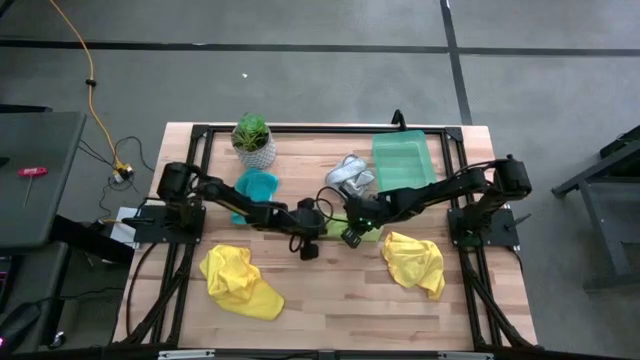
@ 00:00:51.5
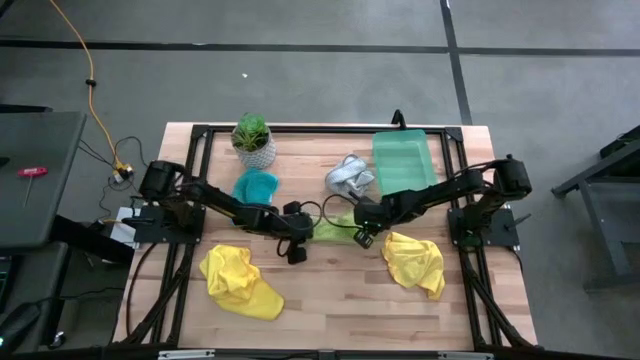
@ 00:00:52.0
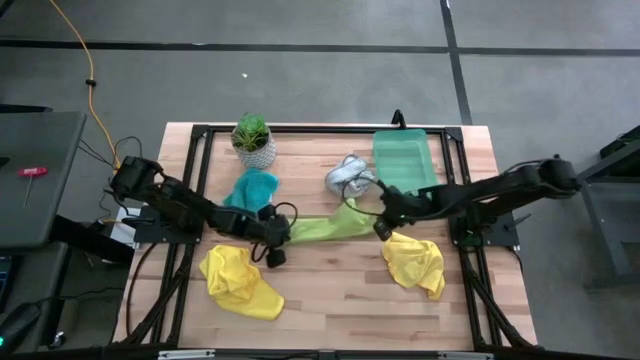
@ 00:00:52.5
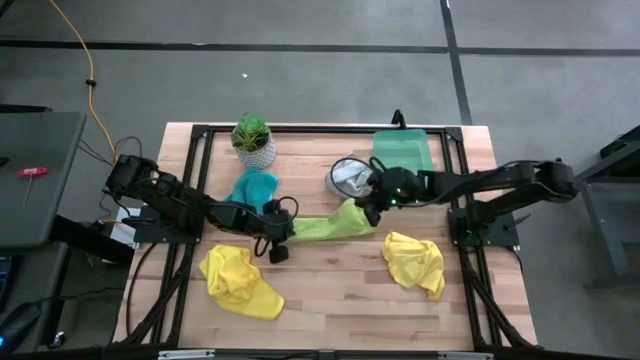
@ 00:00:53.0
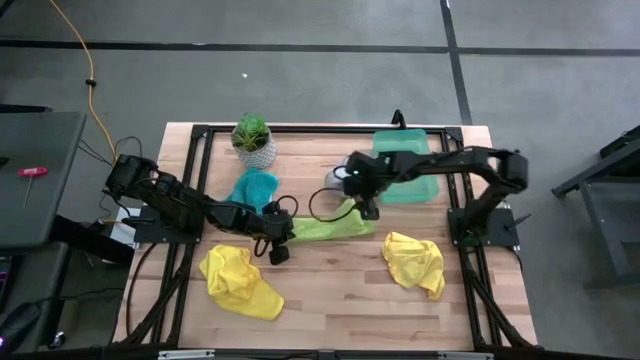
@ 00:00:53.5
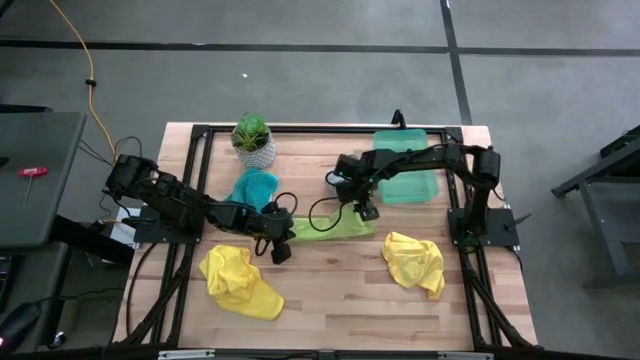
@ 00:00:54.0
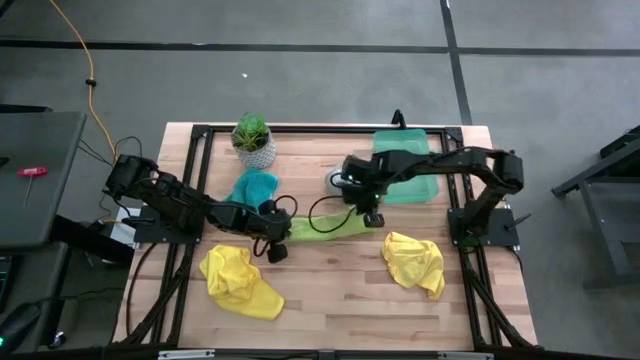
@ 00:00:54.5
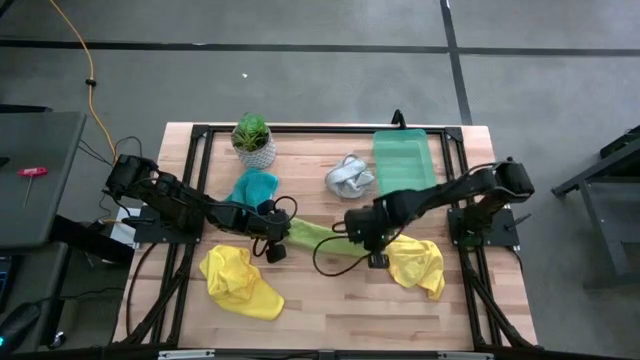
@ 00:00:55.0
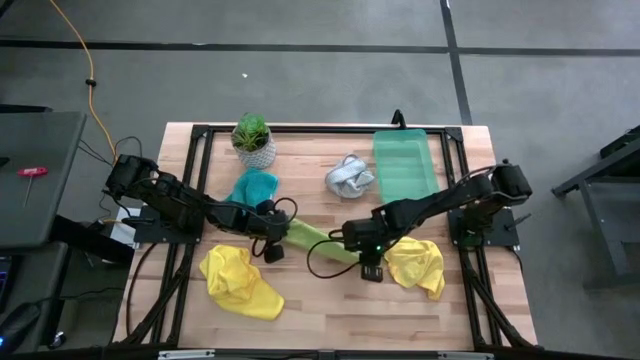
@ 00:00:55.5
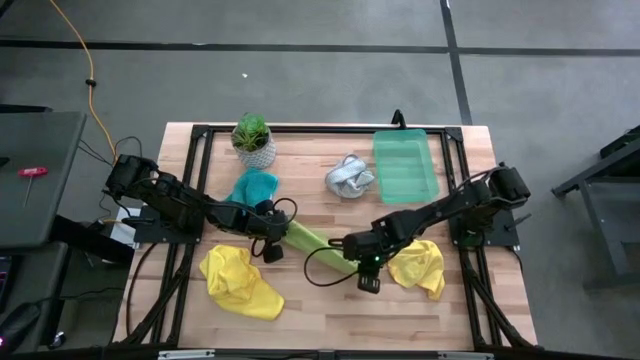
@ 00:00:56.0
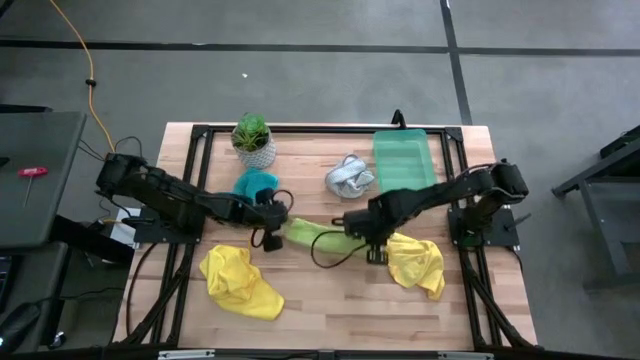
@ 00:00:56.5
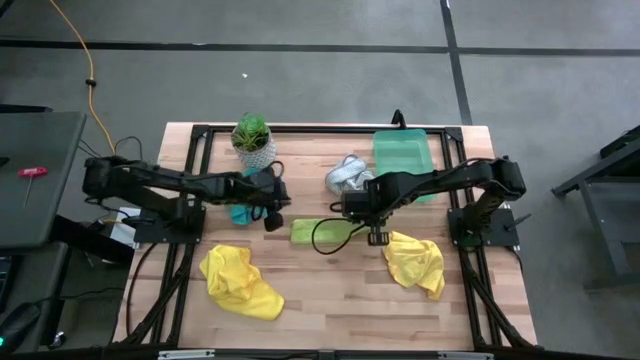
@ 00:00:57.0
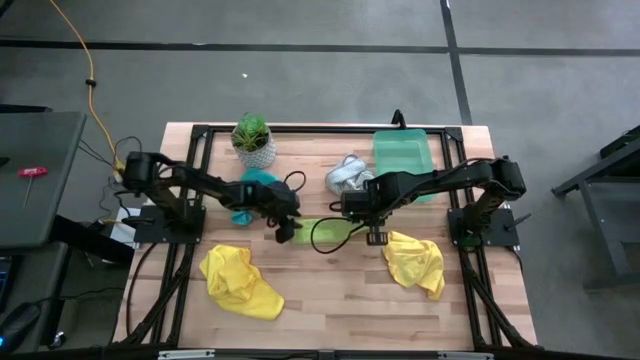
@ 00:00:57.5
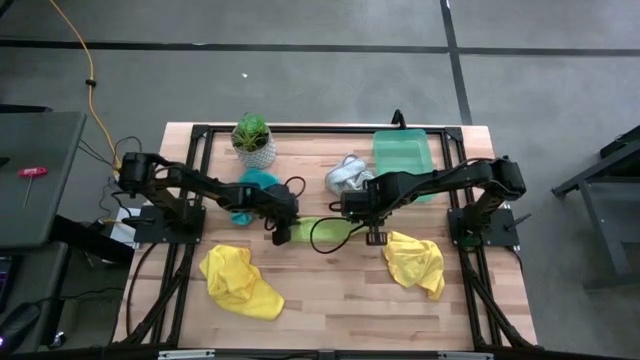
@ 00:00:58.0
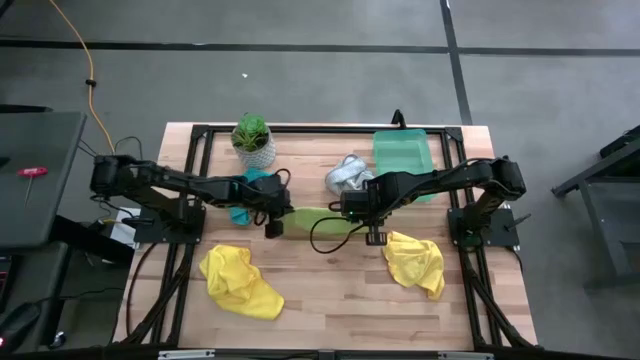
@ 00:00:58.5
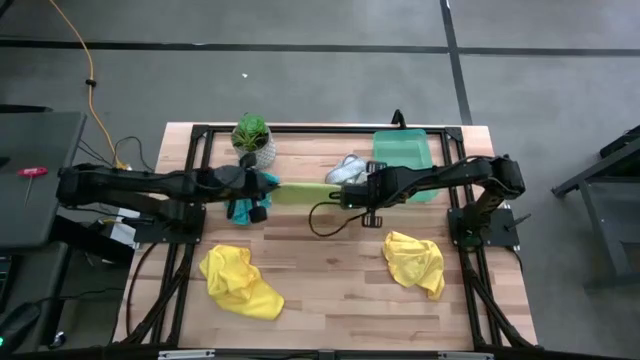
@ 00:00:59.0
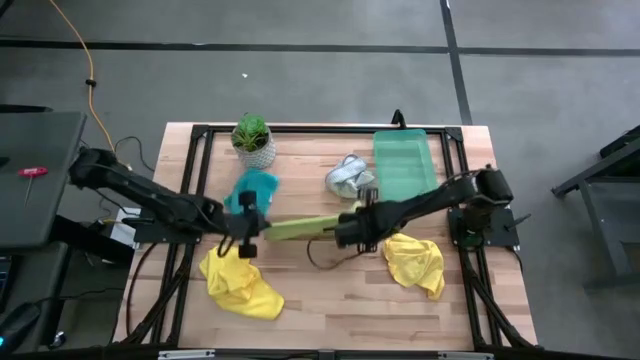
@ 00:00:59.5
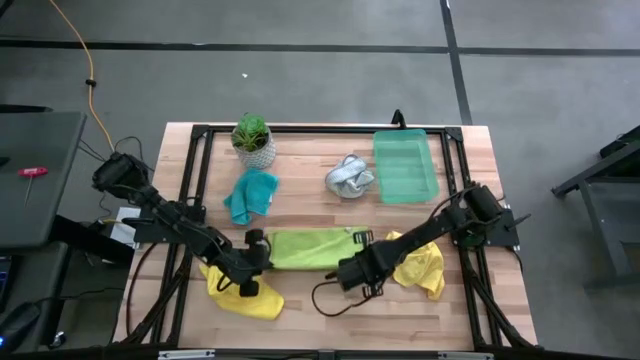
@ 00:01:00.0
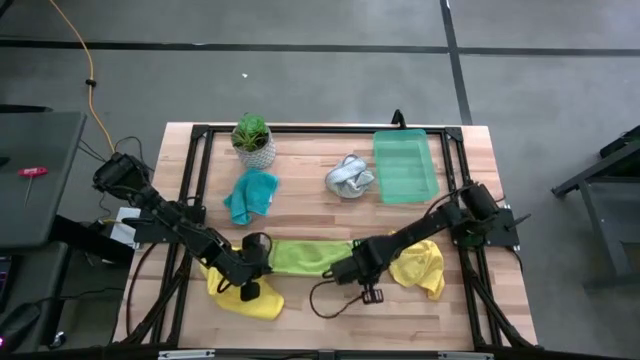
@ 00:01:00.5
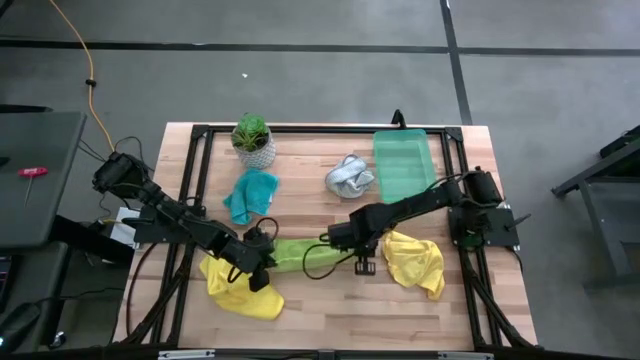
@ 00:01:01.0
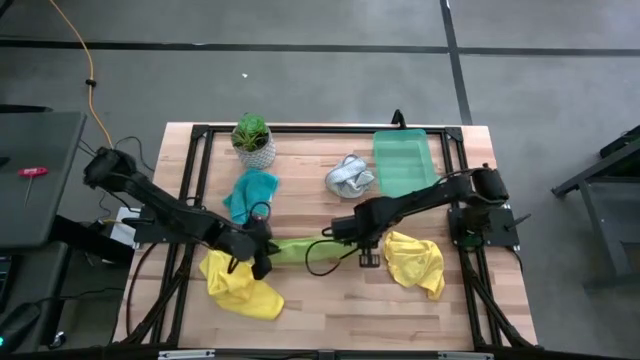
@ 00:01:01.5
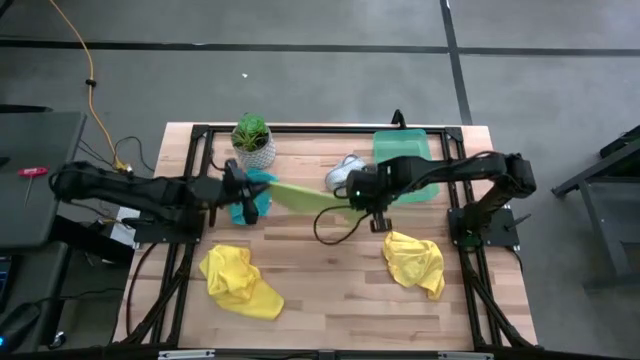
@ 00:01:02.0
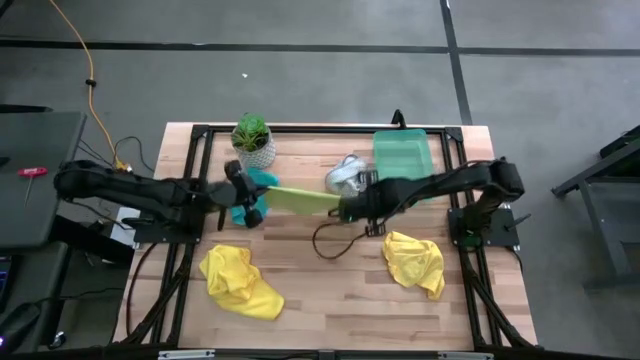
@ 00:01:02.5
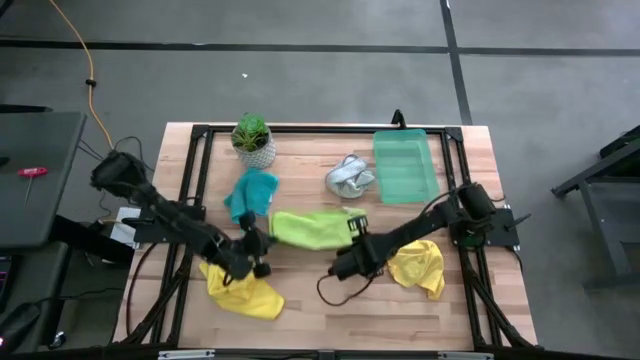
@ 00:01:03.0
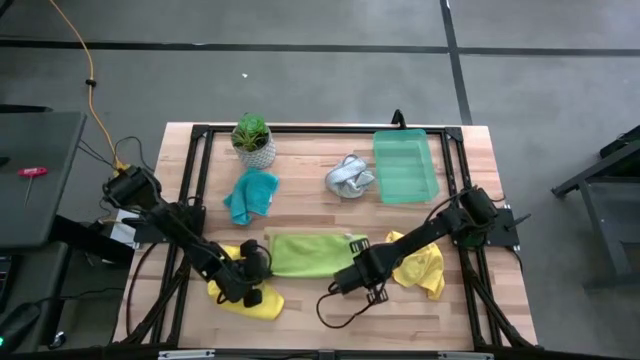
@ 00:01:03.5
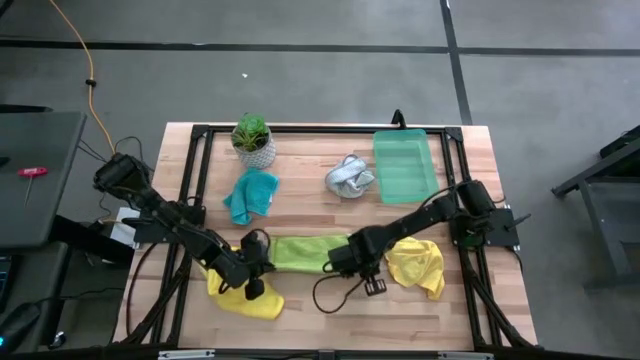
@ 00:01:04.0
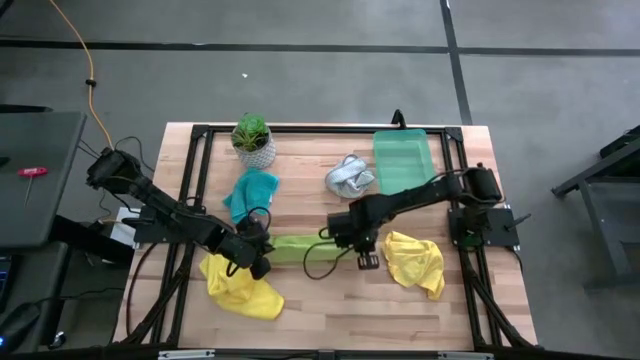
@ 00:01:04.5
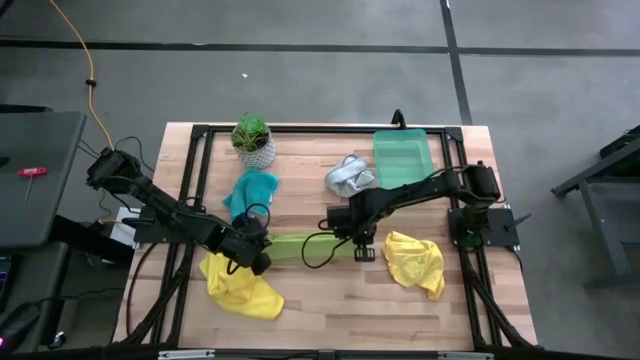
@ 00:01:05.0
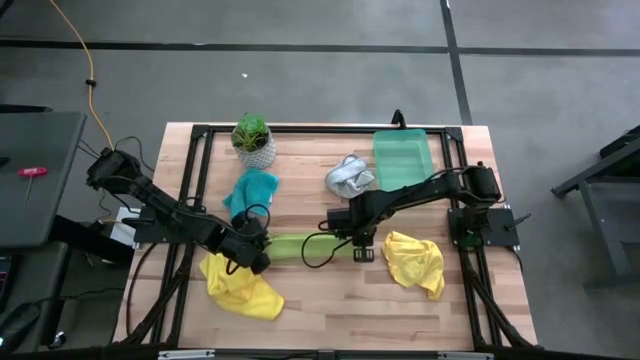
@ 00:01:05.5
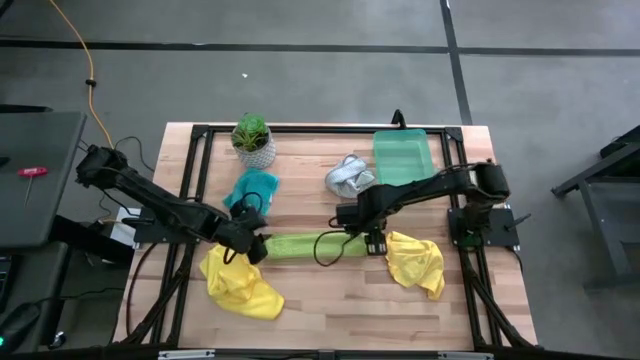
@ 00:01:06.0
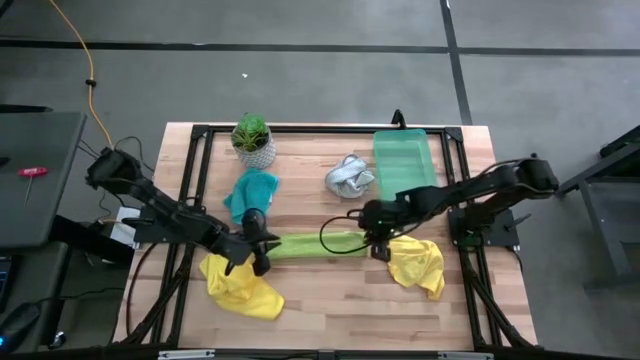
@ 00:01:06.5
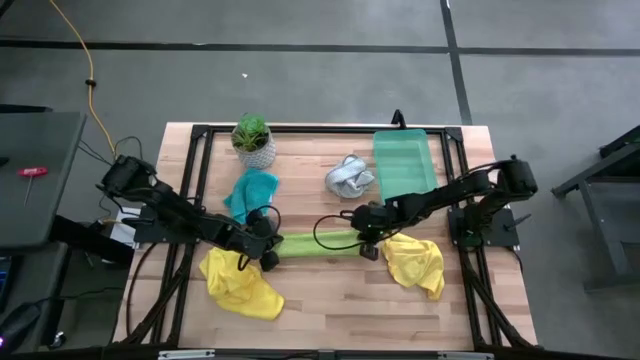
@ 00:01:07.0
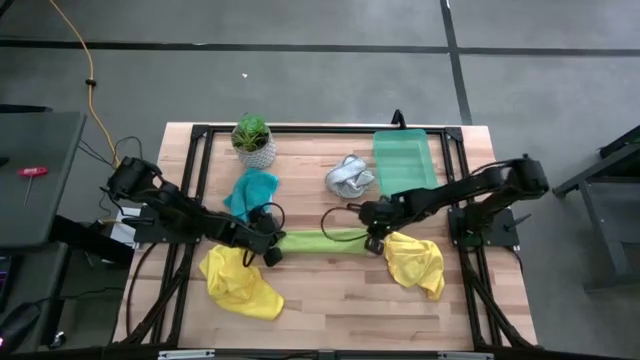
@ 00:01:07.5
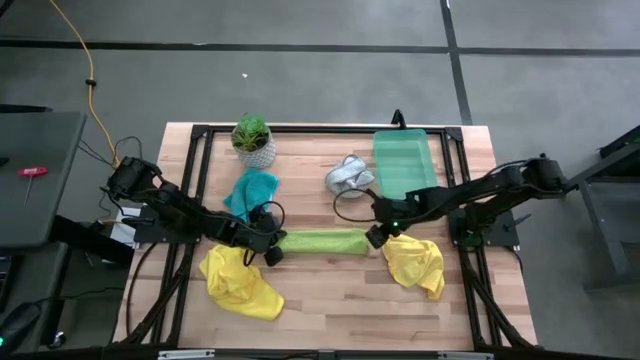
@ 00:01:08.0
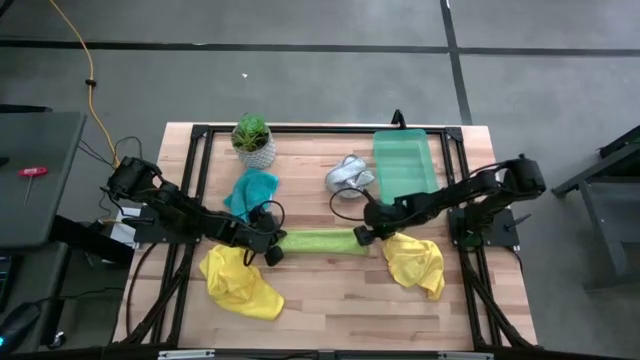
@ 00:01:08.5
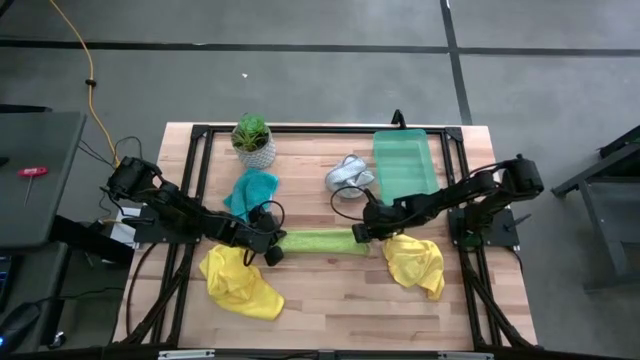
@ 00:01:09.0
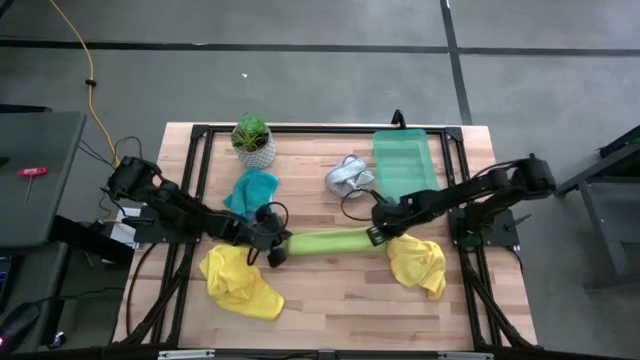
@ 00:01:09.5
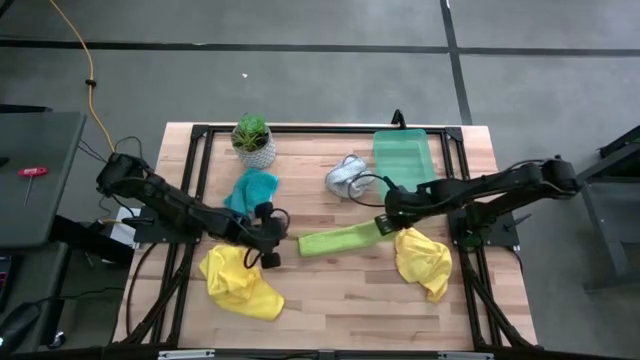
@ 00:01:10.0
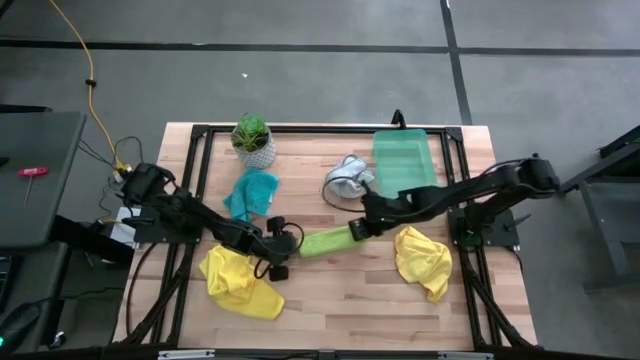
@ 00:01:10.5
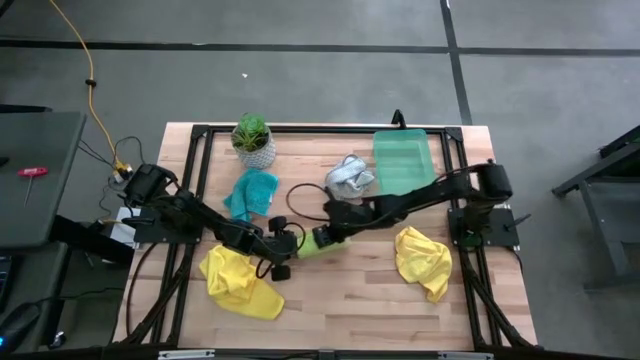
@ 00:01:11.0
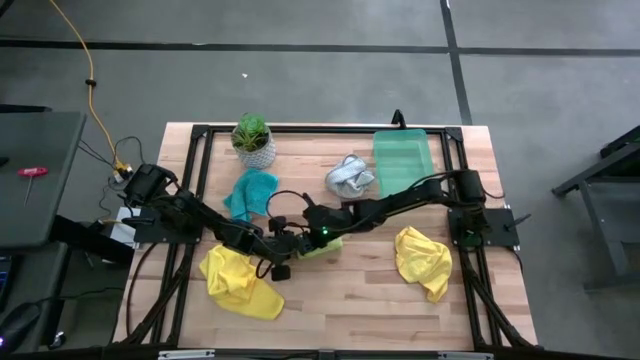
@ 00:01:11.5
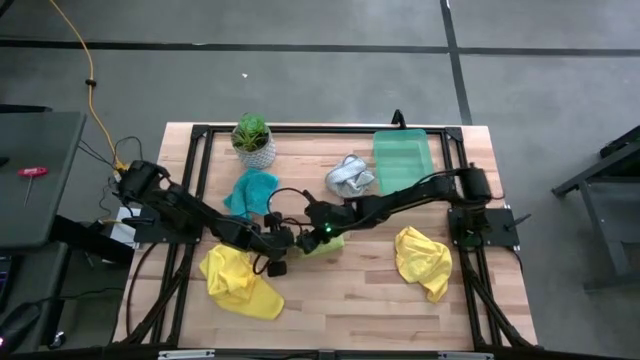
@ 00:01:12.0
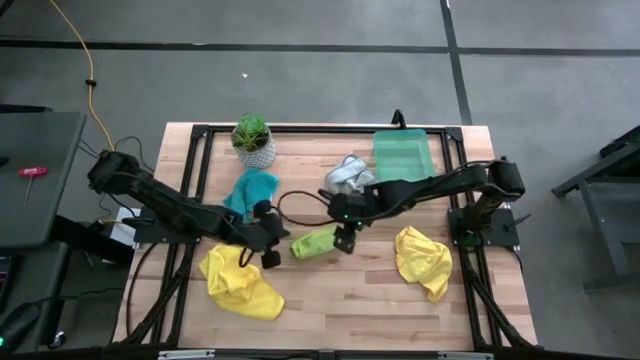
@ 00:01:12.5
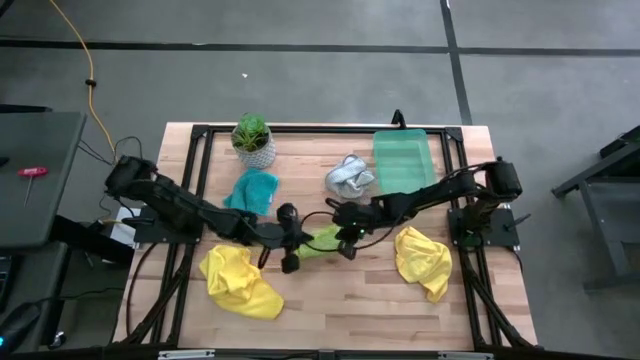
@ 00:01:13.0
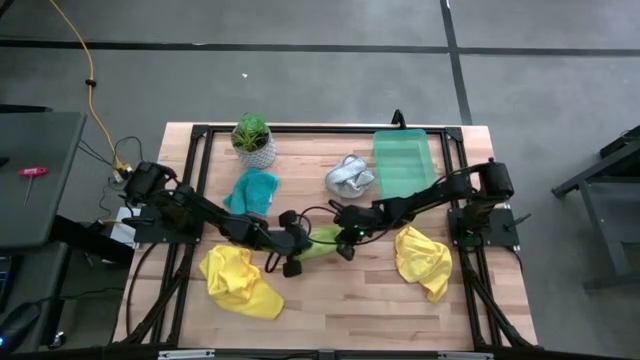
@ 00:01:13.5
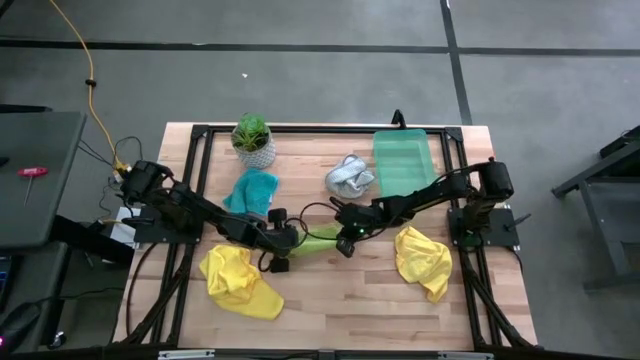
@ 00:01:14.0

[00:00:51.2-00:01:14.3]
Task: Fold microfiber towels
Fold the green microfiber cloth
